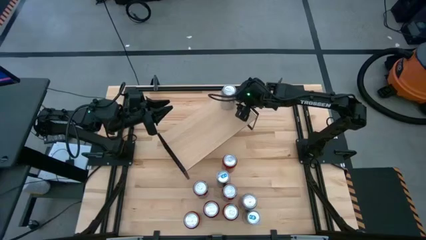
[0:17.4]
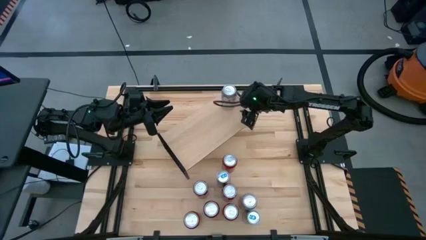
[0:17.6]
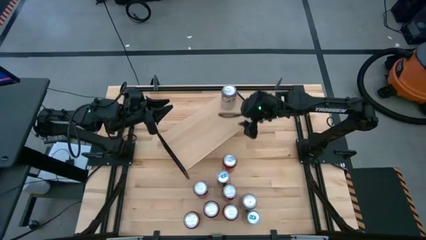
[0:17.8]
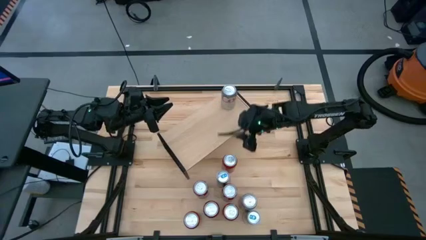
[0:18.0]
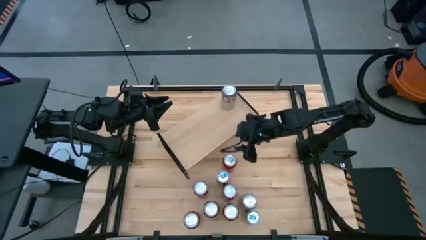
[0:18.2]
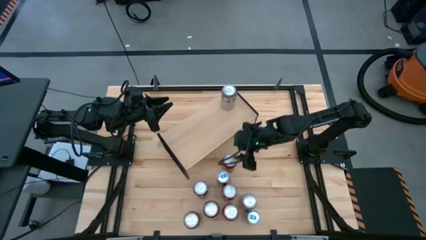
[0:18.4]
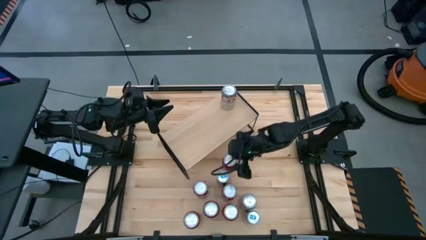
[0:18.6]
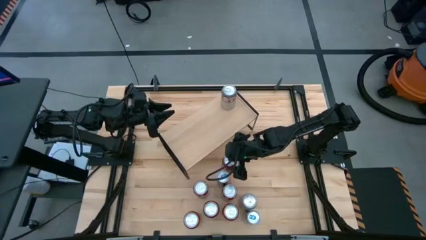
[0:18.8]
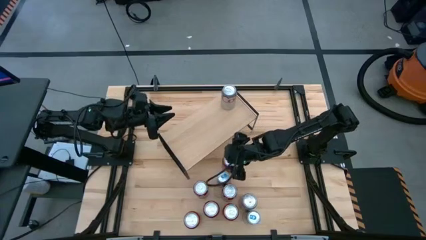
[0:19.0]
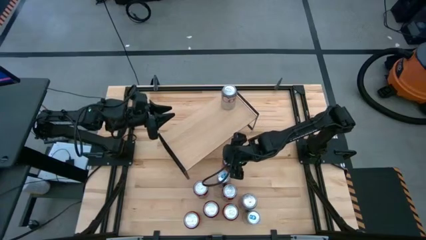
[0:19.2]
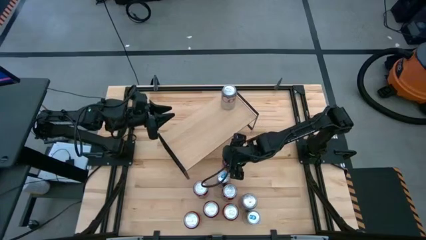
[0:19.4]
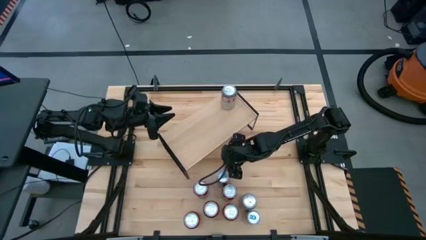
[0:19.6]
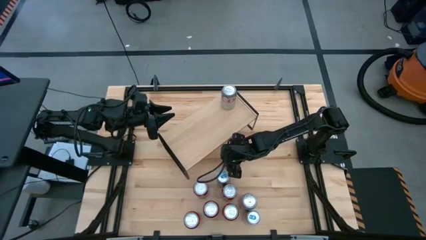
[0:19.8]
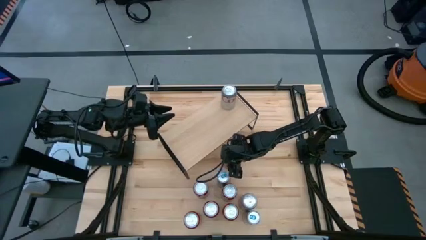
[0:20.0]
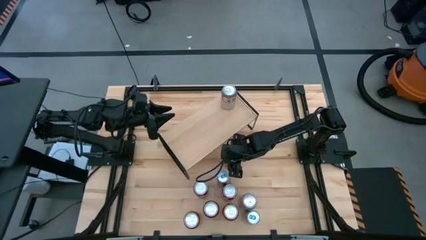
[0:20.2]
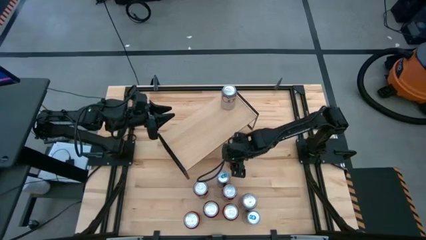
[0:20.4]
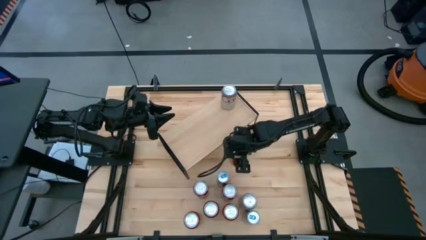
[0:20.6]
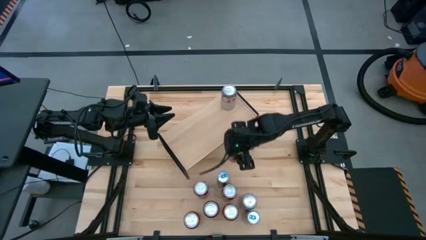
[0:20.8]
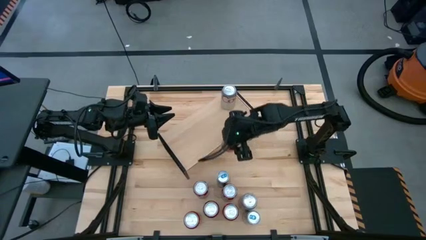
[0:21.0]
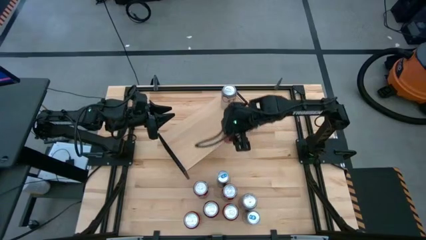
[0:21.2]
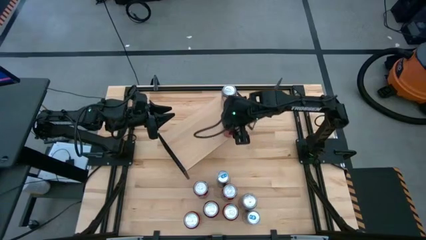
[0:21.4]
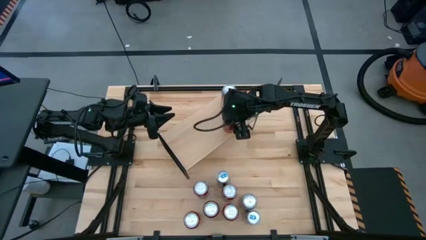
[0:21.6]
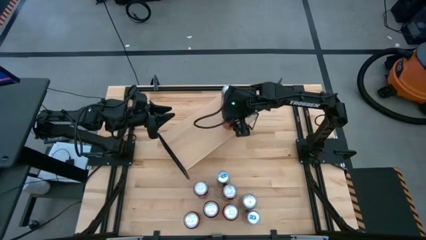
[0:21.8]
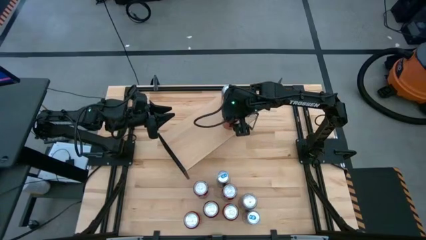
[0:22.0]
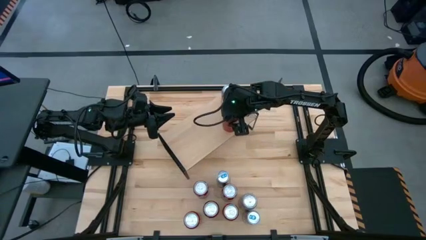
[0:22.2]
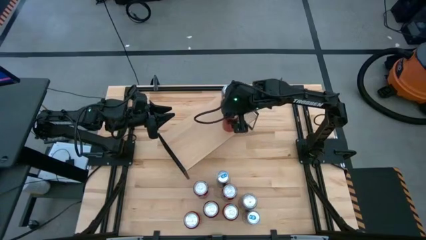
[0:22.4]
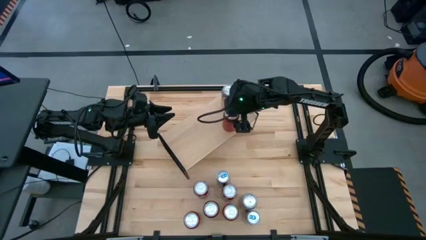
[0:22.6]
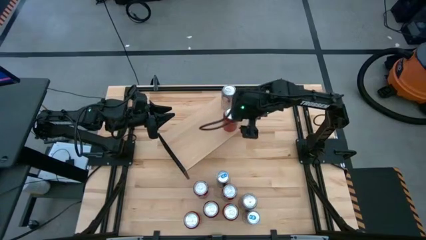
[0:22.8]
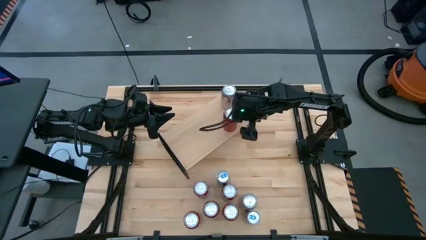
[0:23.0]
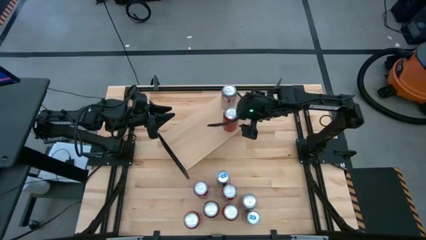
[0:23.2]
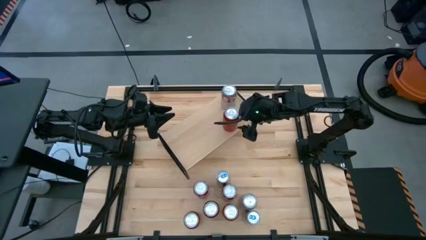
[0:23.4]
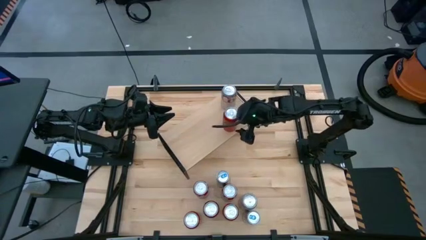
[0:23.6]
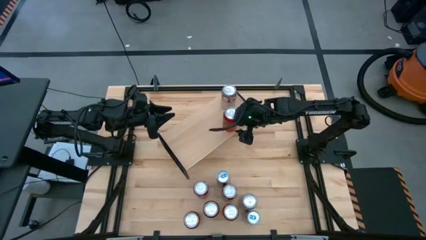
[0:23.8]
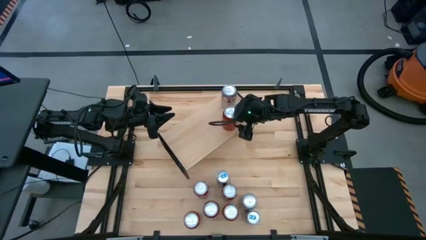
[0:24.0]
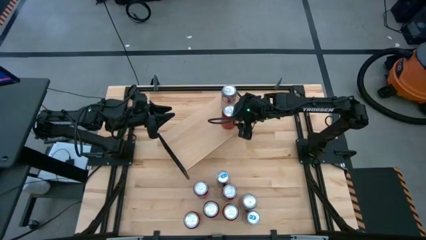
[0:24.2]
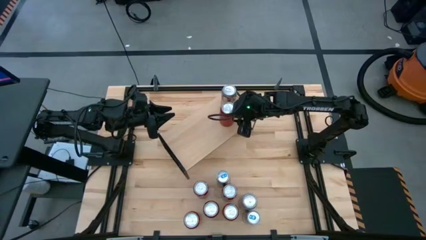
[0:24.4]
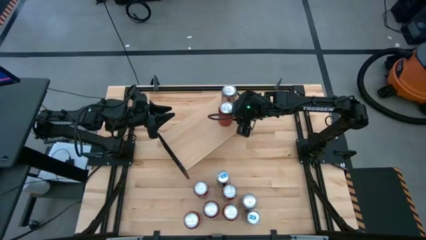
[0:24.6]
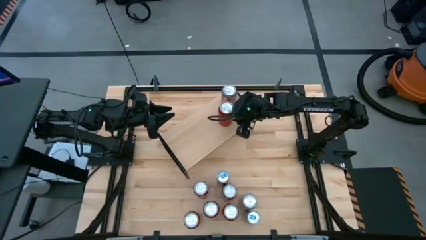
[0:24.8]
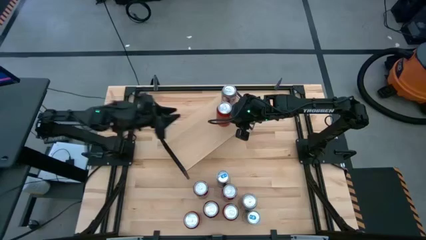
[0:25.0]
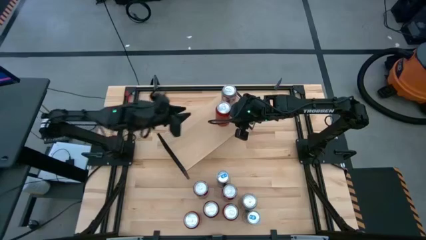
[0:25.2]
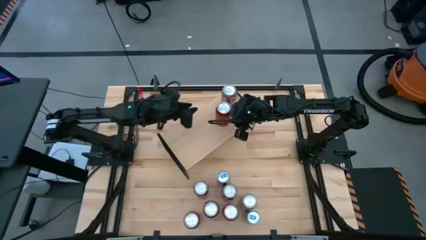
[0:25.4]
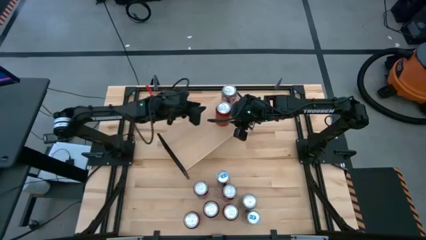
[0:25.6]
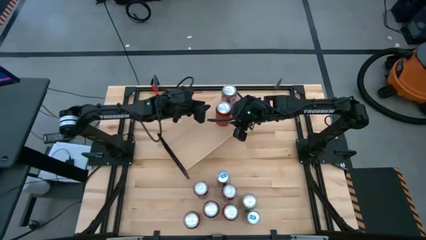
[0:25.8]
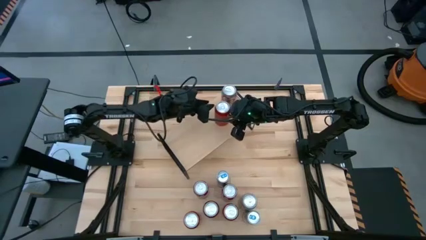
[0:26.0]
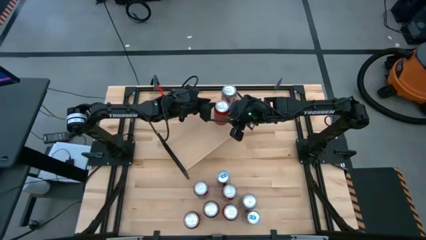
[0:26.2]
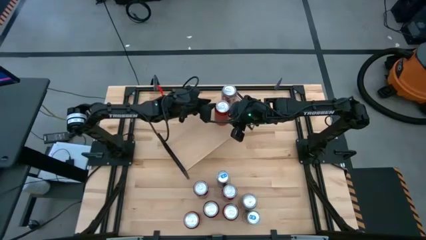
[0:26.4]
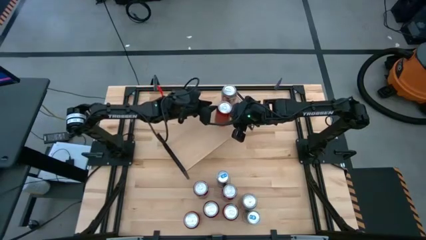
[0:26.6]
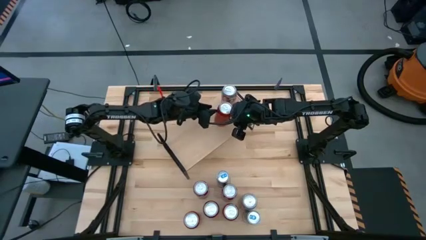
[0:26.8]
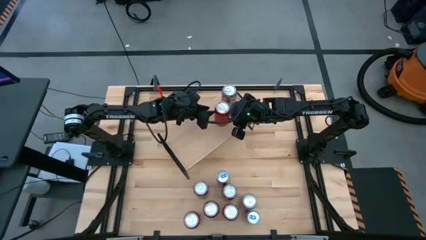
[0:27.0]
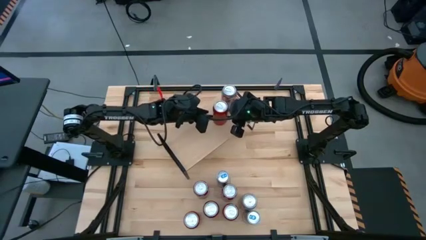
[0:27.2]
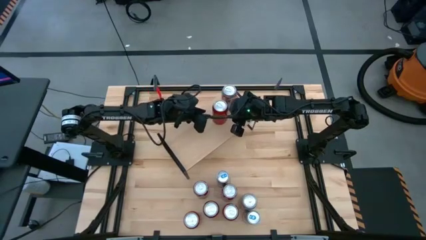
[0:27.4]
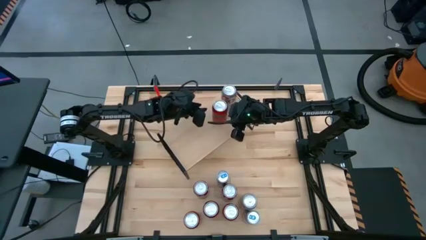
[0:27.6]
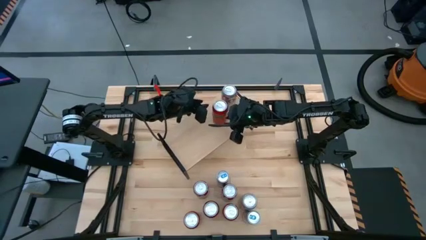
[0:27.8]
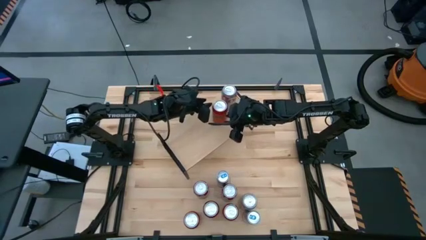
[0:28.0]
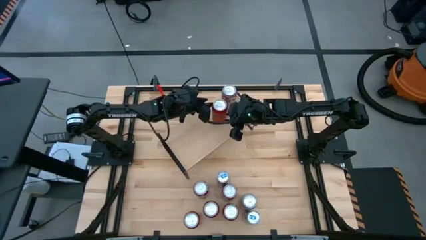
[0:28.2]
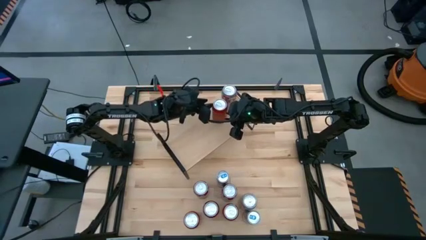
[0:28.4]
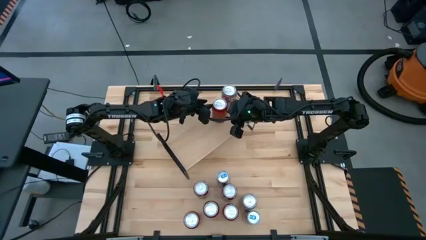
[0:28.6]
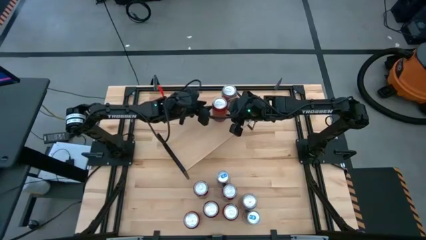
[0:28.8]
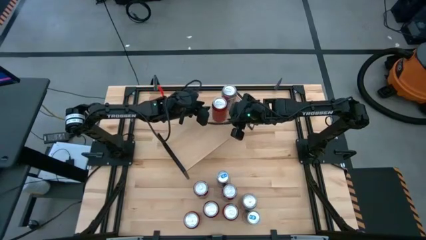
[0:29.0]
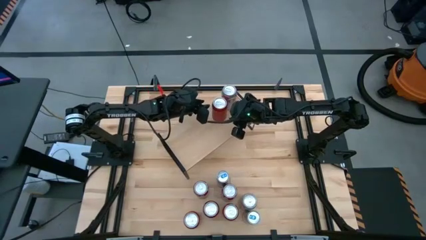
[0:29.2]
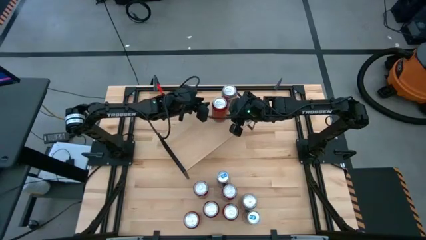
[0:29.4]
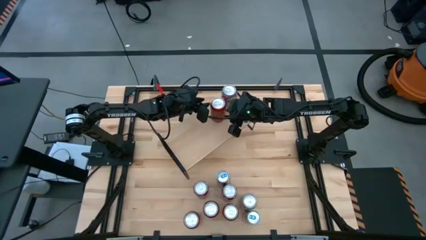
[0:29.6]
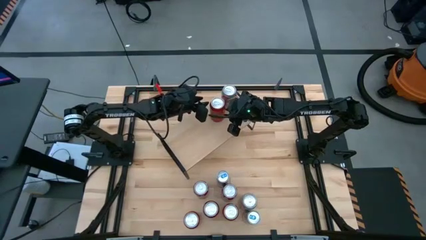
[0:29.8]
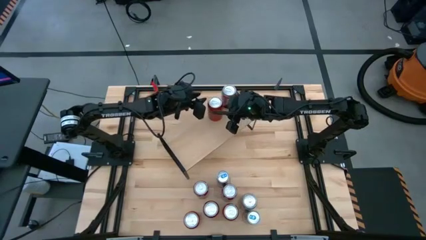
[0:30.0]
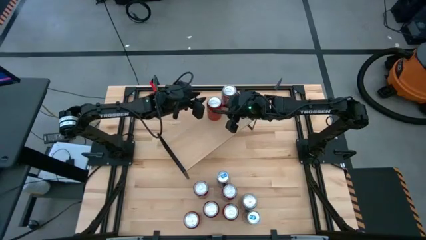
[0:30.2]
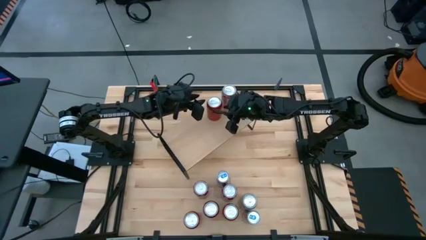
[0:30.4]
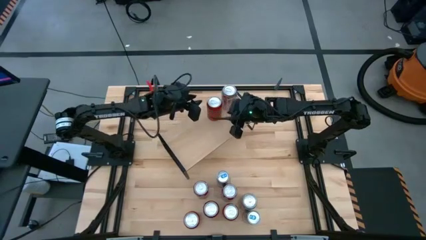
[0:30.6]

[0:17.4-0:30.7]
Task: Place canned beverage on shelf
Put the top red and black soda can on the shelf

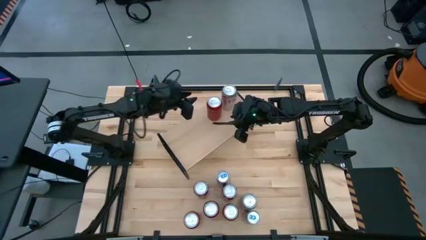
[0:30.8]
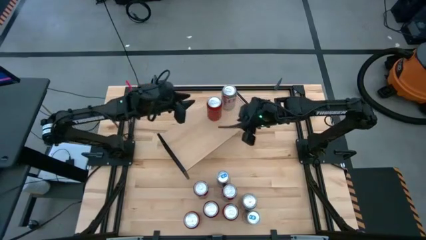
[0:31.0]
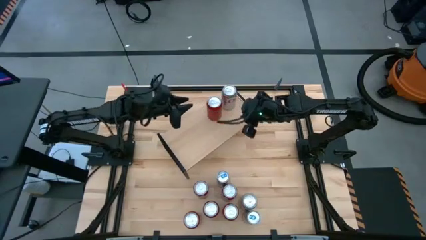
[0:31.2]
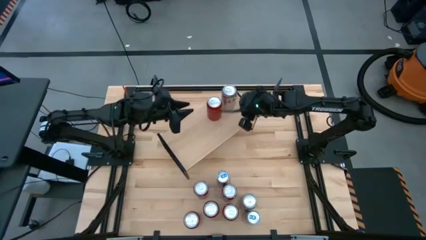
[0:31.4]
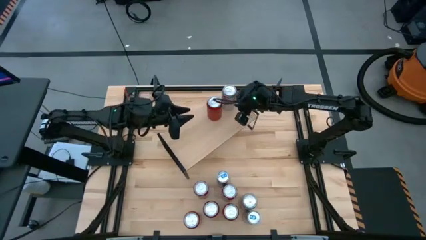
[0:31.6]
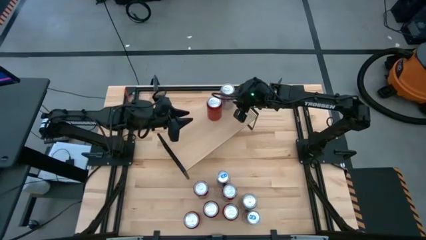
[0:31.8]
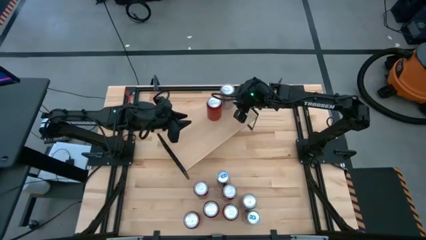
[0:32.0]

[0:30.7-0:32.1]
Adjust the red-silver soda can on the shelf

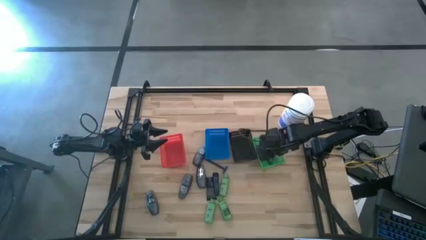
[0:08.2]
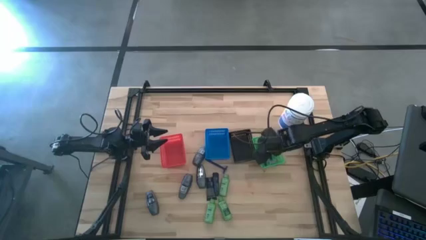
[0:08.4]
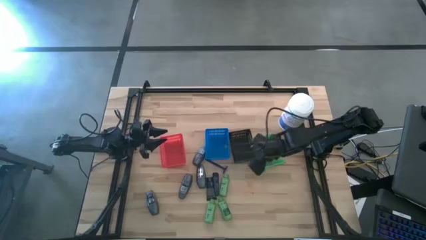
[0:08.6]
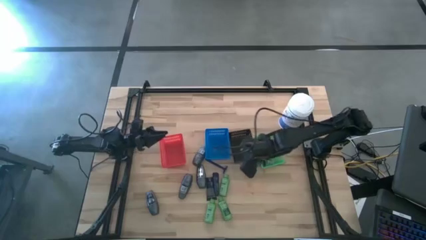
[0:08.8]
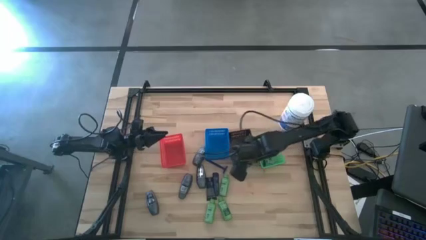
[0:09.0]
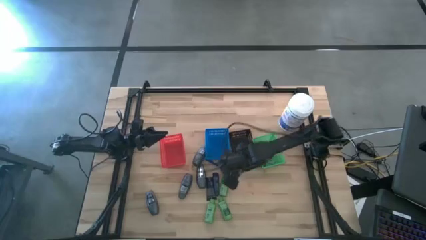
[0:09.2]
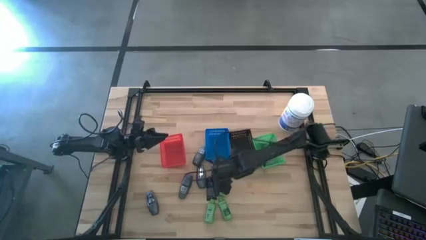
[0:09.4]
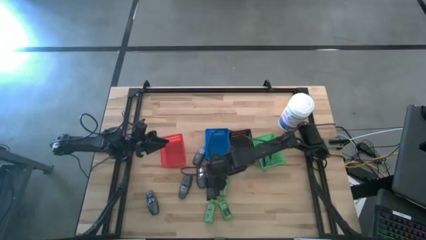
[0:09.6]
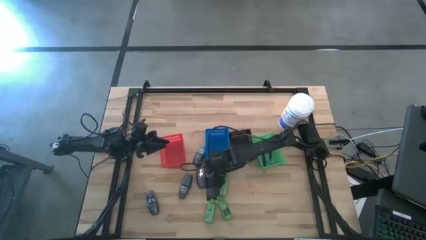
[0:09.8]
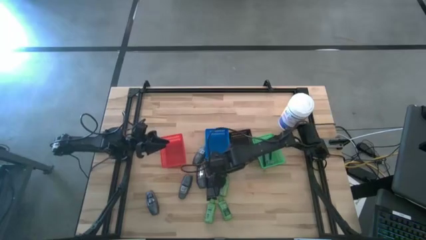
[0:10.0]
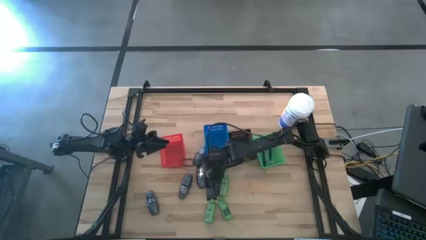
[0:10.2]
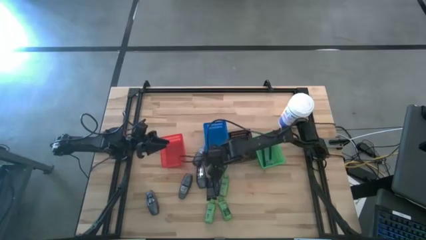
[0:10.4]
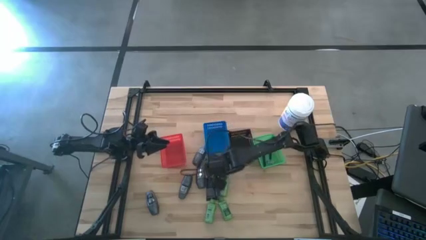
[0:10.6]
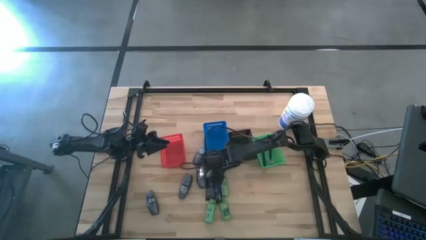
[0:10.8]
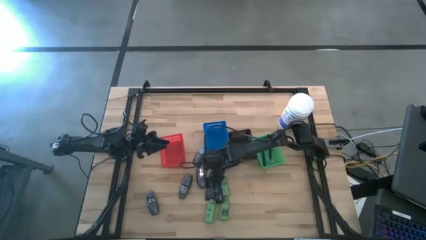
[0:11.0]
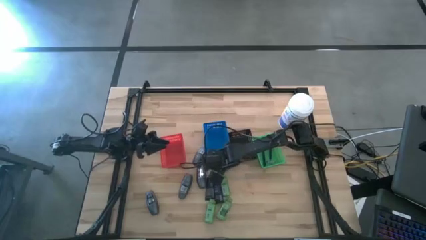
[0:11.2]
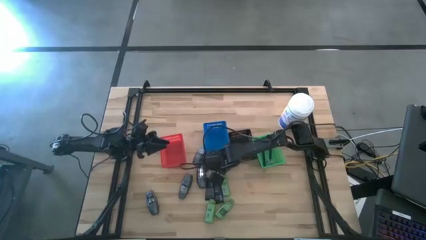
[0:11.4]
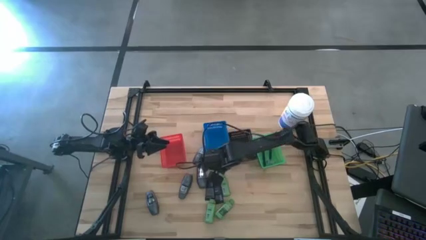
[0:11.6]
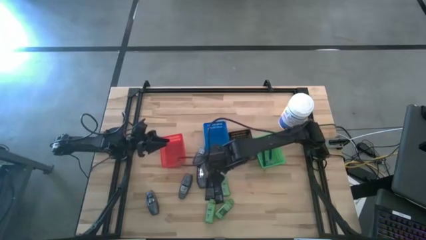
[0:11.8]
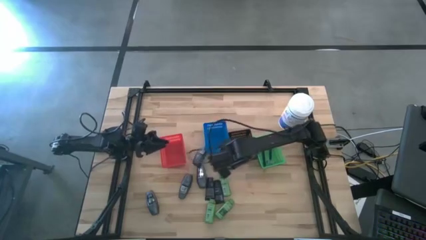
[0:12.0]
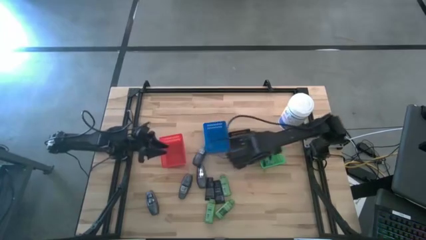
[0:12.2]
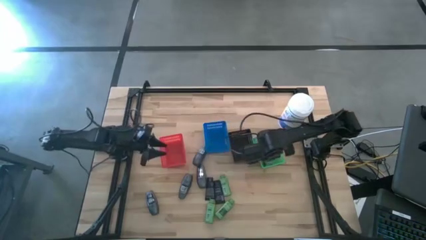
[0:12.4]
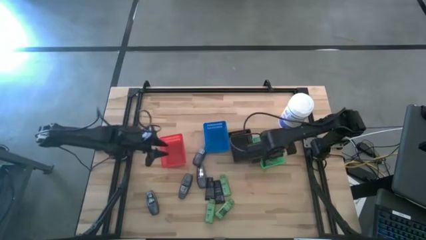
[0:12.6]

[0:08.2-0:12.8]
Task: Pick & Place Travel size toiletries
Put the blue razor into the bin
